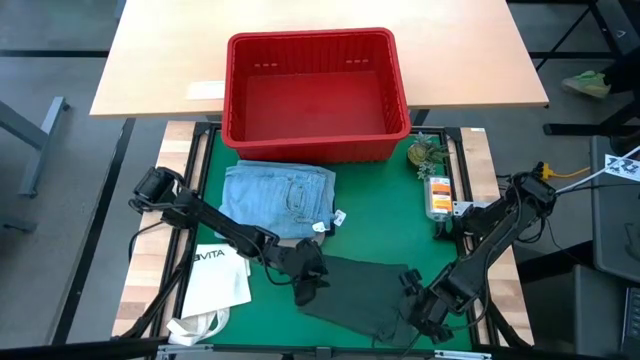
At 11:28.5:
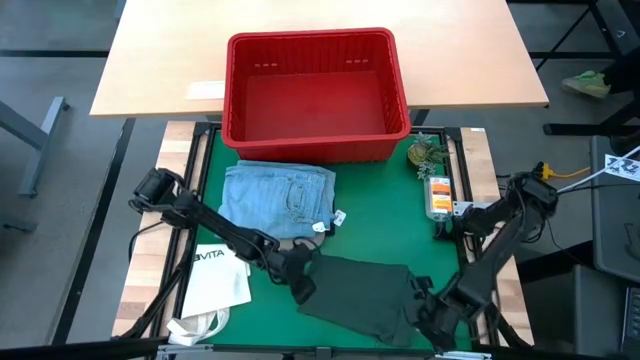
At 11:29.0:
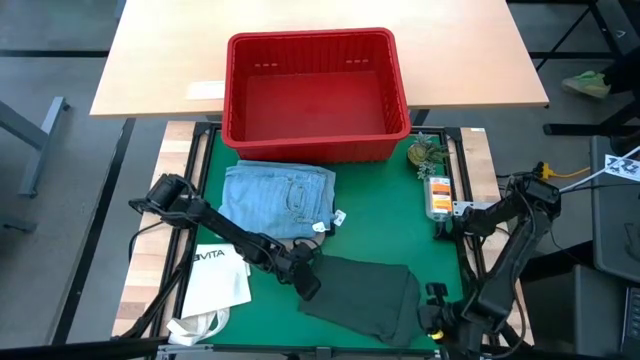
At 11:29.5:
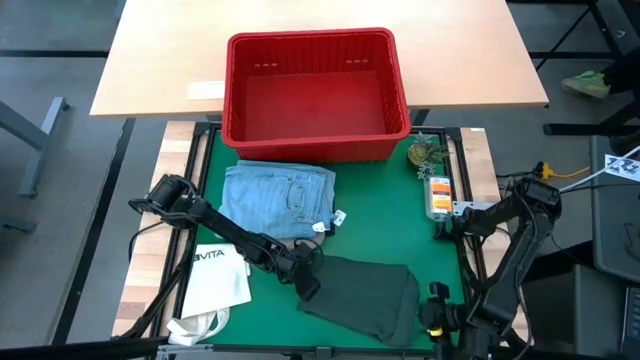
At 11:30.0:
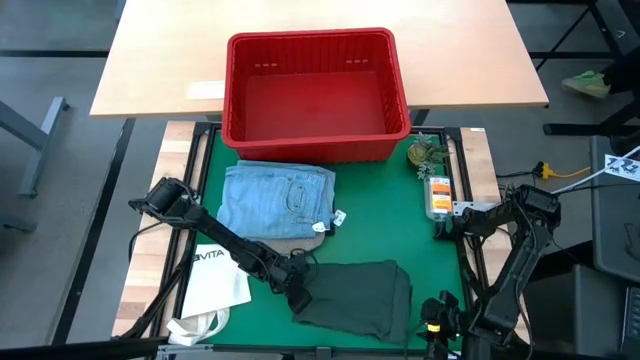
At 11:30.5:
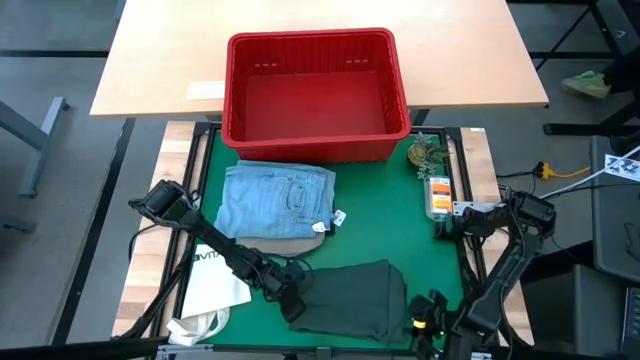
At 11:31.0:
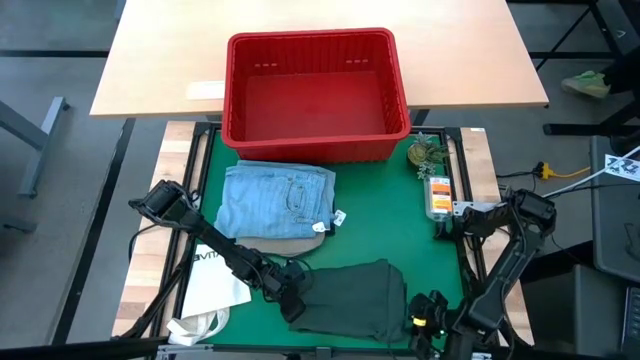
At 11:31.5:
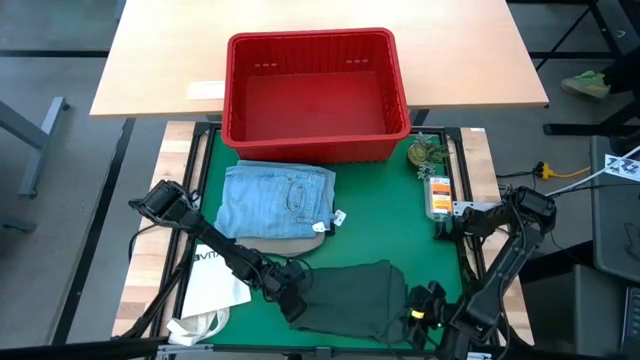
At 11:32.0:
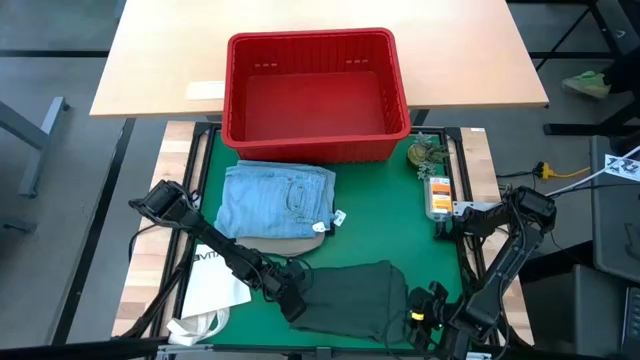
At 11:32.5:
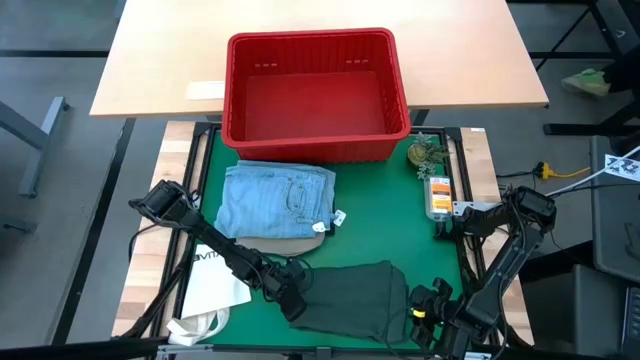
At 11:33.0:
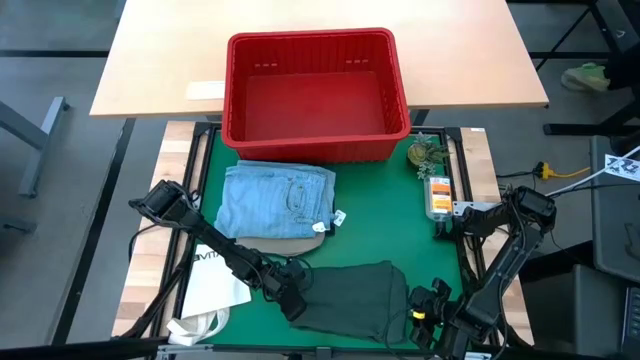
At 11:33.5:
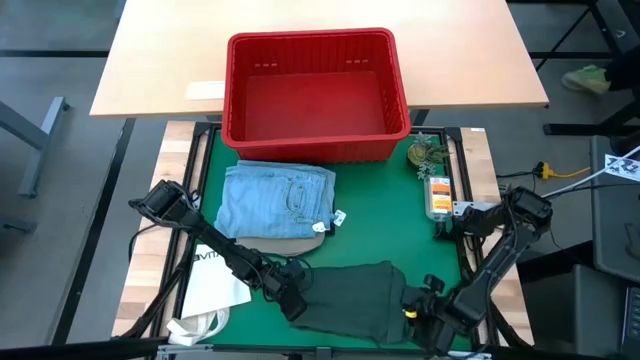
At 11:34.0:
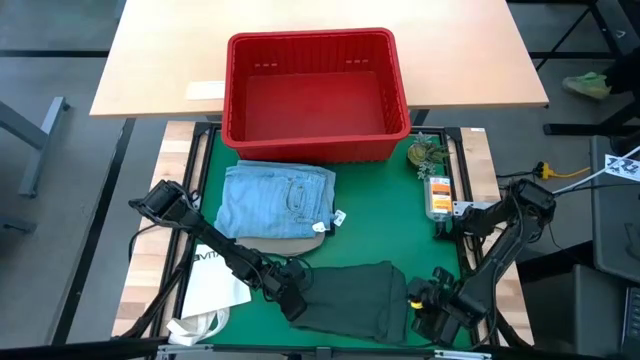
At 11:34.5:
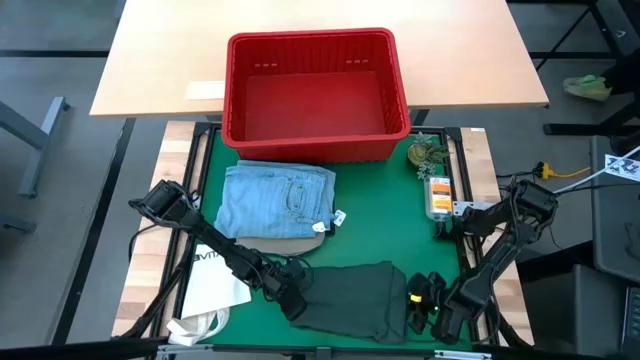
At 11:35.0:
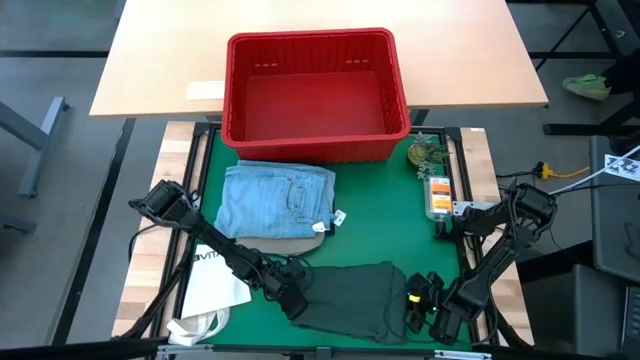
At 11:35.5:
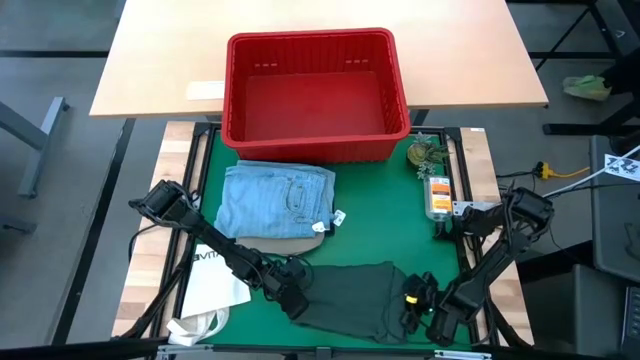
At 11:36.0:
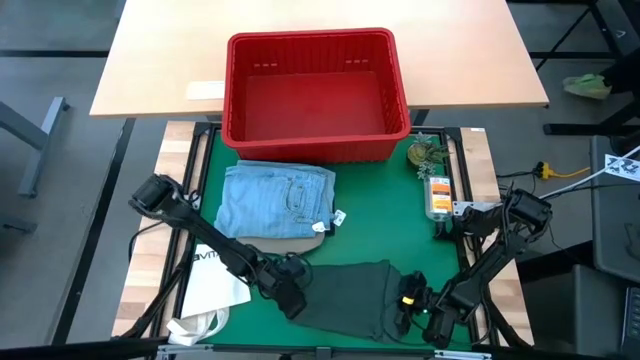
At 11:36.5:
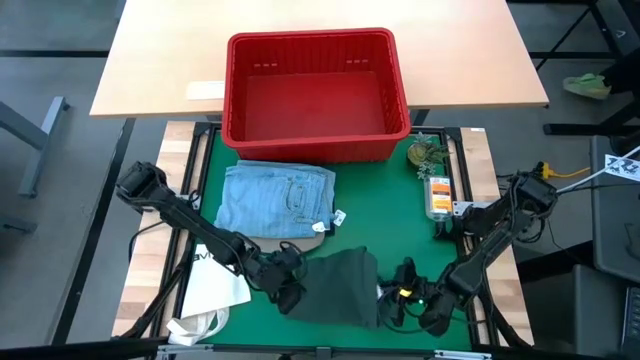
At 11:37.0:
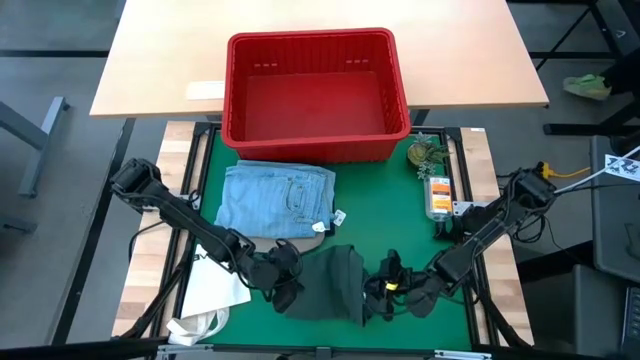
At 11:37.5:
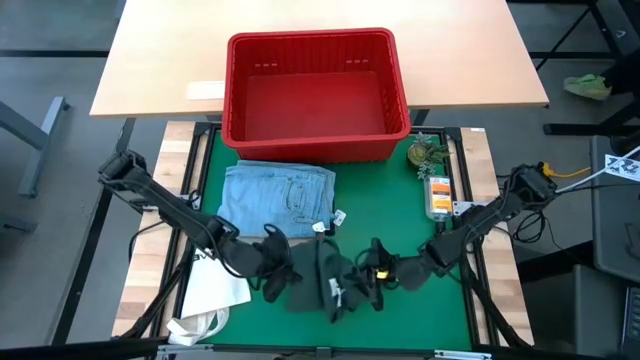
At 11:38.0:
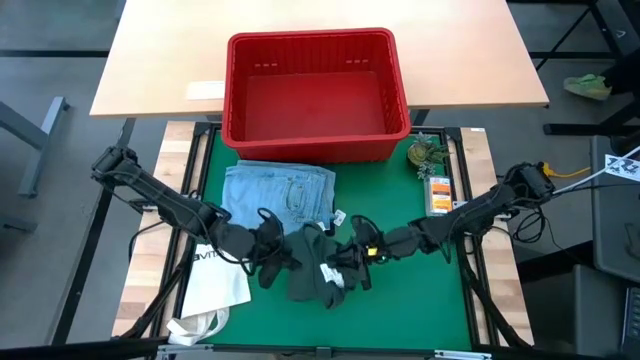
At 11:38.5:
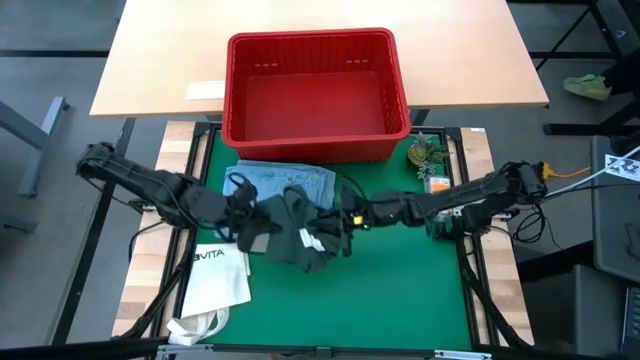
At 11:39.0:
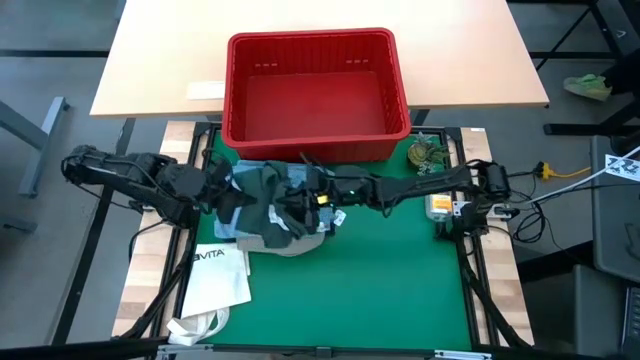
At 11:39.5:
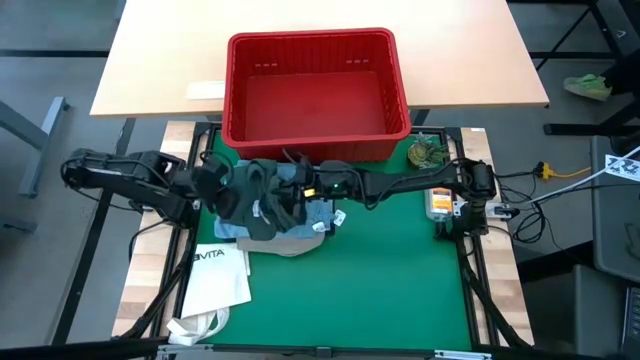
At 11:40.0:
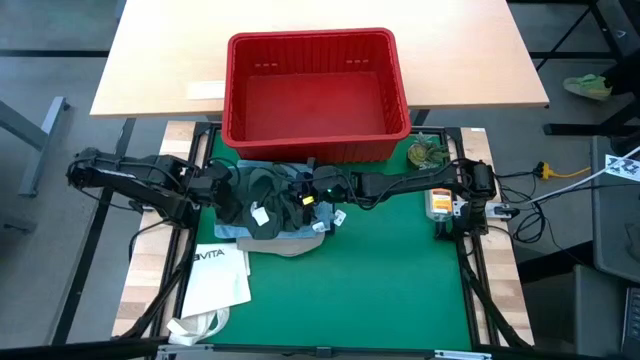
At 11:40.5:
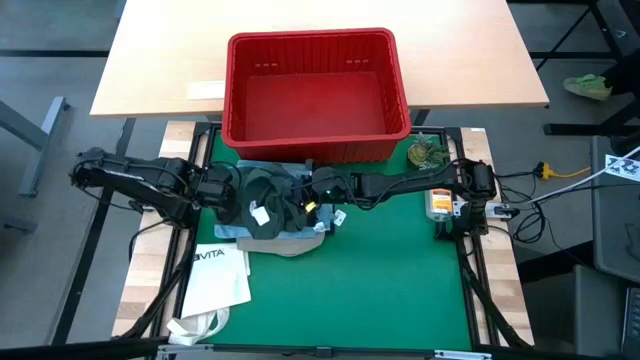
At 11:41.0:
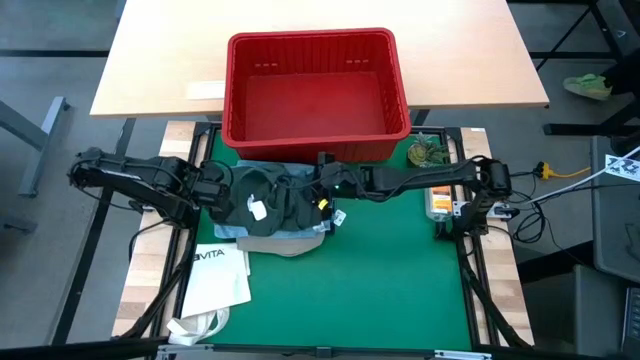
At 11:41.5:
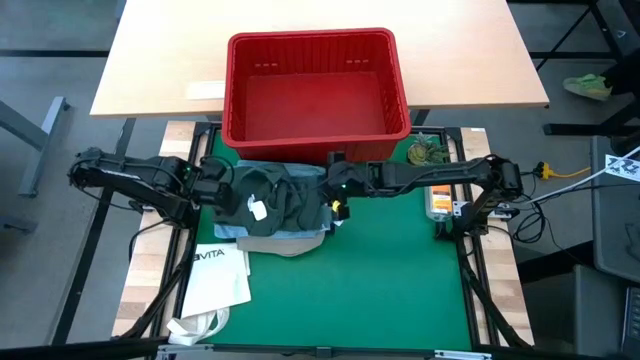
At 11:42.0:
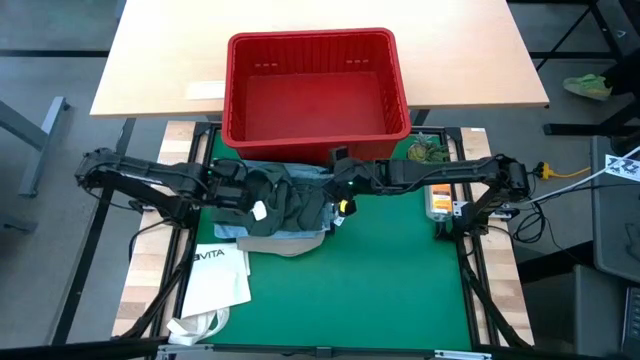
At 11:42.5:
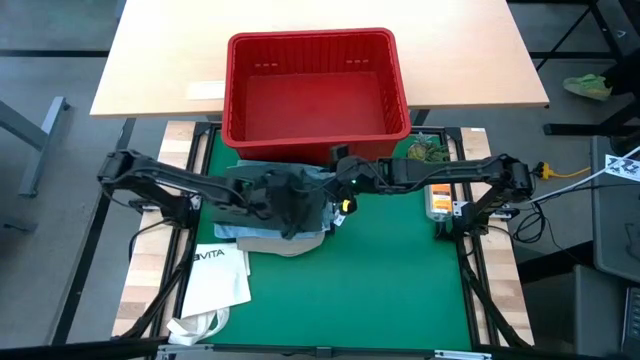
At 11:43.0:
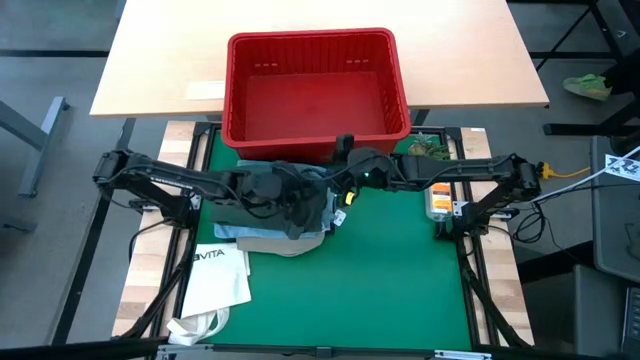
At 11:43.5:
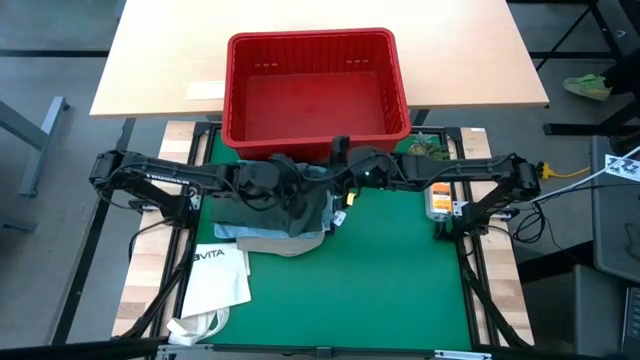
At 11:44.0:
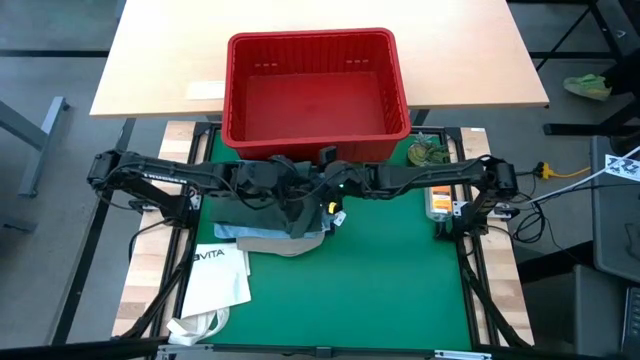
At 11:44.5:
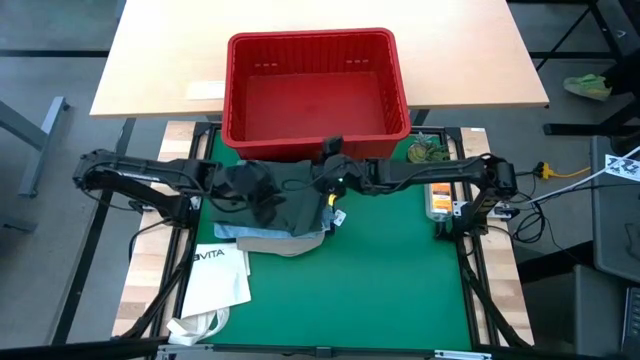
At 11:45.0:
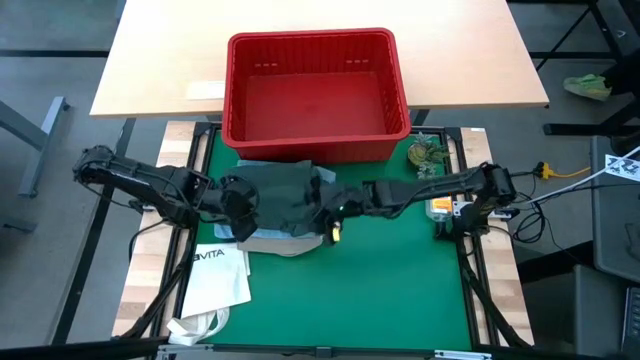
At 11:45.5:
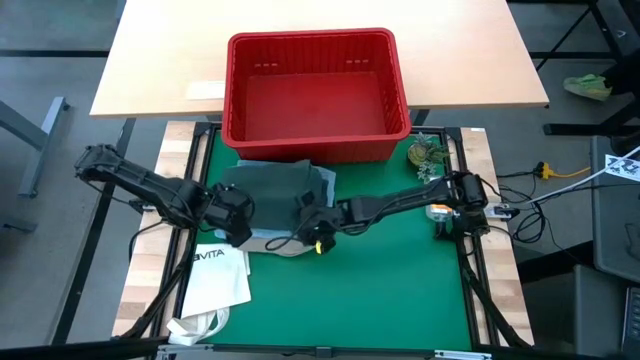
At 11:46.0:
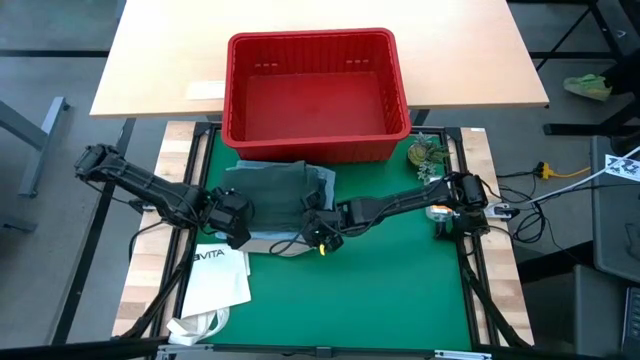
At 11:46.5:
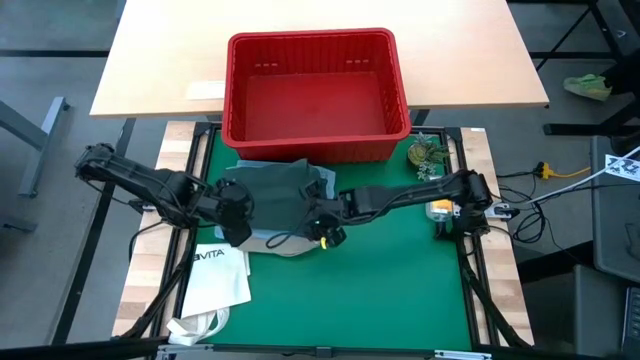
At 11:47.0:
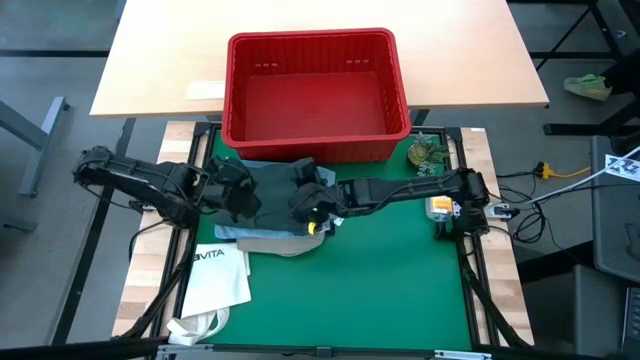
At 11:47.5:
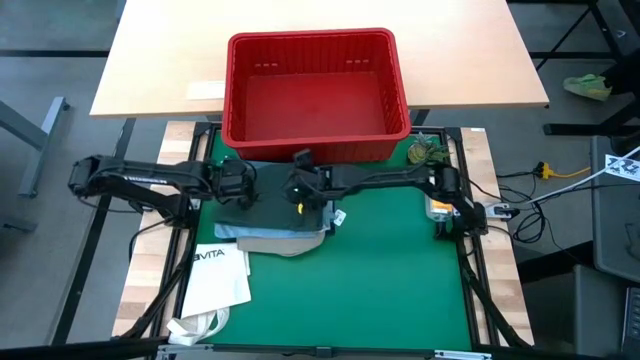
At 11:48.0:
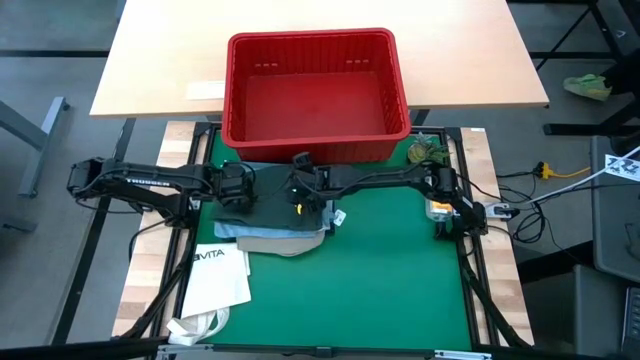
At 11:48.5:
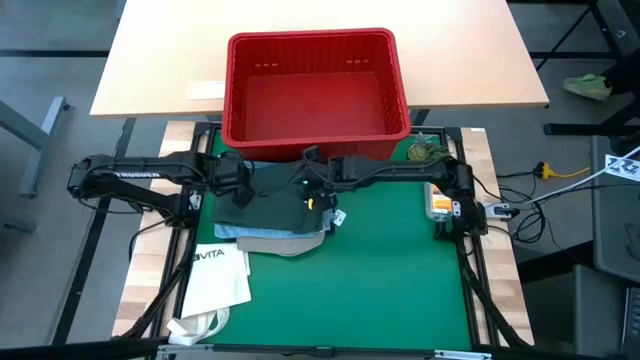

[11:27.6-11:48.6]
Task: Fold Laundry from Bin
Stack the folded green polo shirt on top of the folded light blue pants

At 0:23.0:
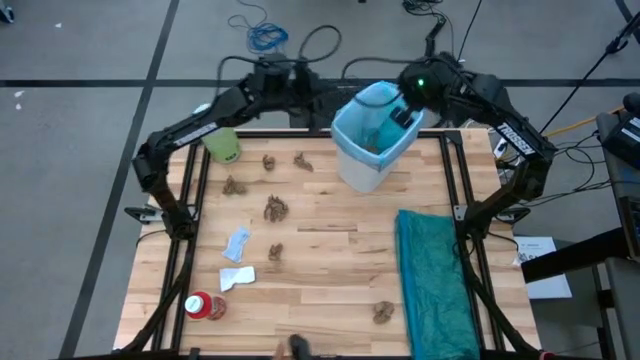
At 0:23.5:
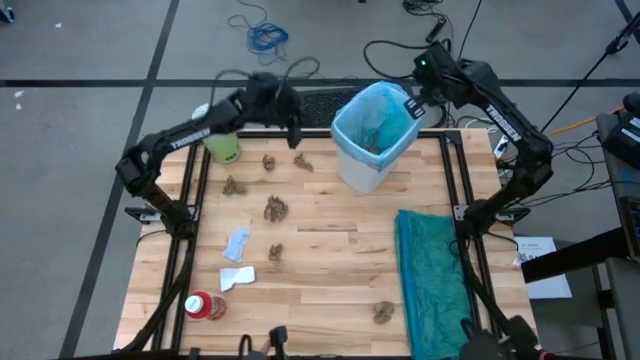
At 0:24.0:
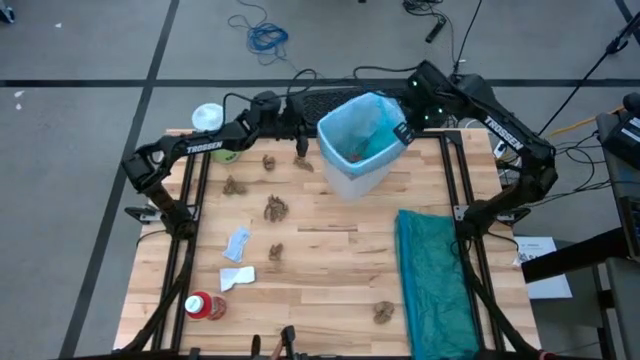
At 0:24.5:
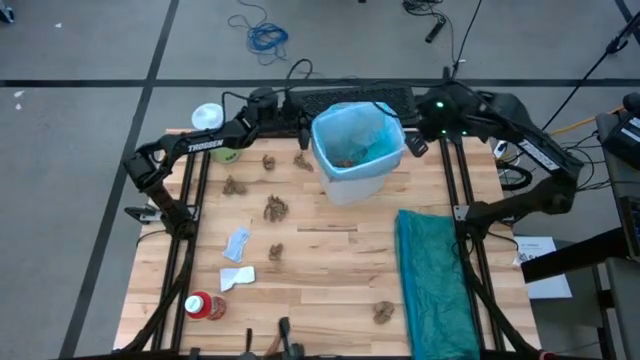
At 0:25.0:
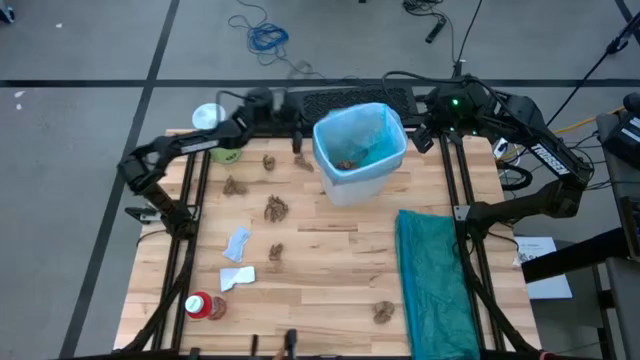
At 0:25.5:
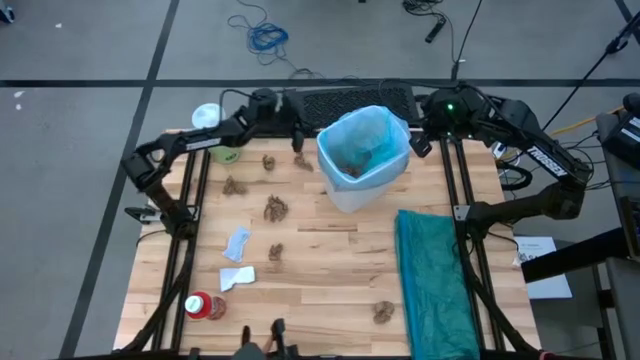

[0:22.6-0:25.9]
Task: place trash/remove bag and relplace
Adjust the trash bin
